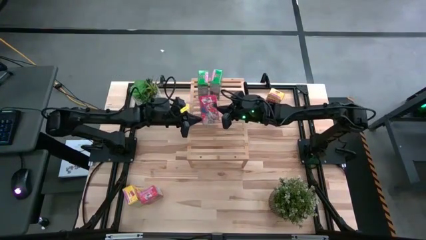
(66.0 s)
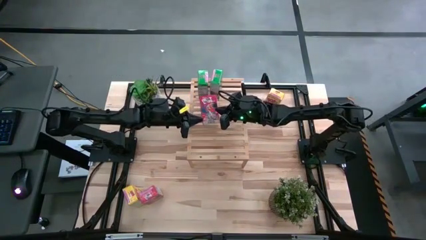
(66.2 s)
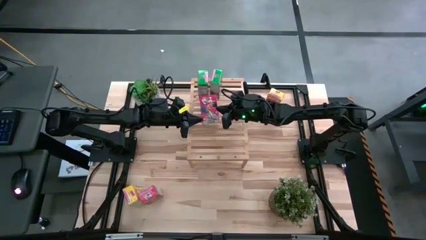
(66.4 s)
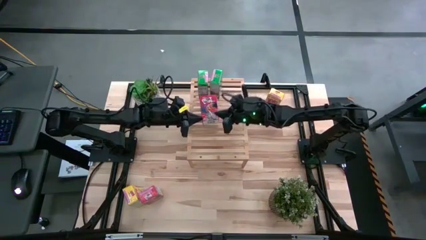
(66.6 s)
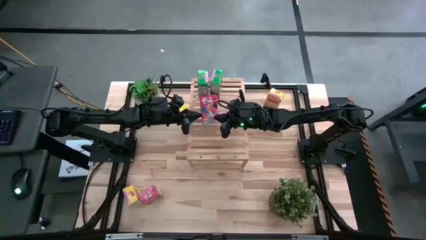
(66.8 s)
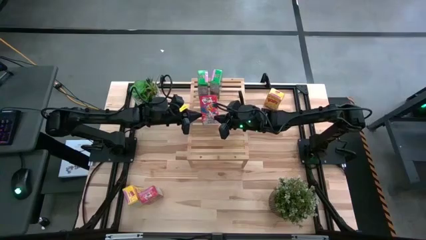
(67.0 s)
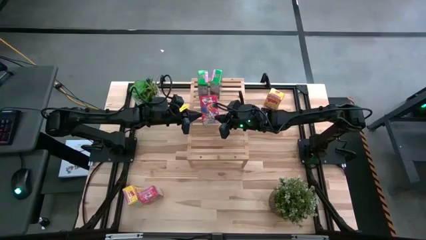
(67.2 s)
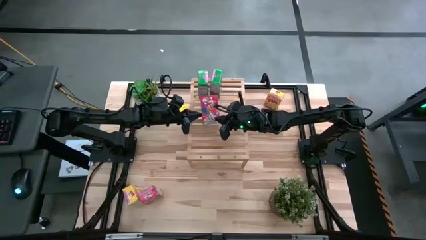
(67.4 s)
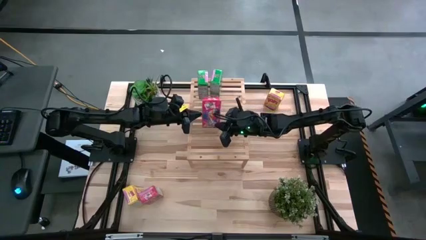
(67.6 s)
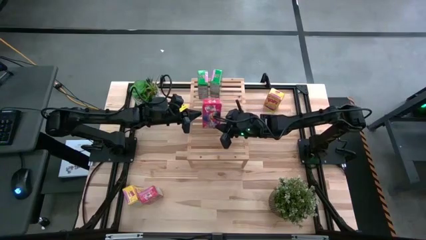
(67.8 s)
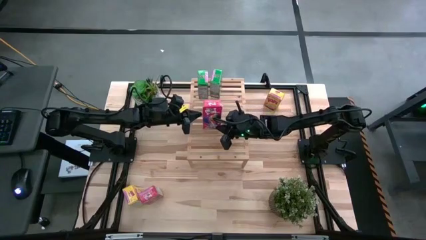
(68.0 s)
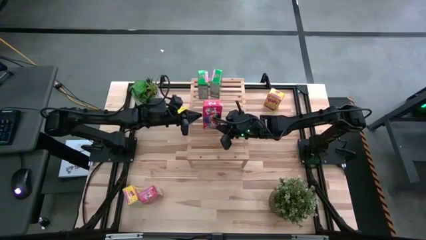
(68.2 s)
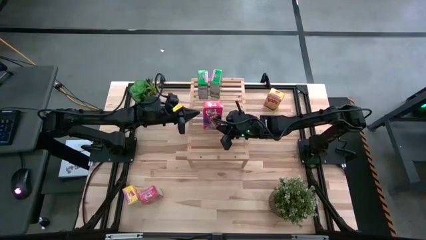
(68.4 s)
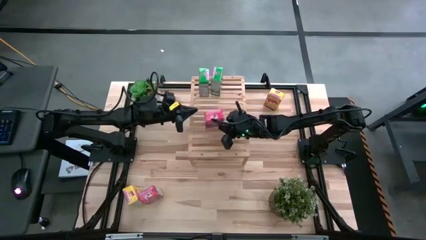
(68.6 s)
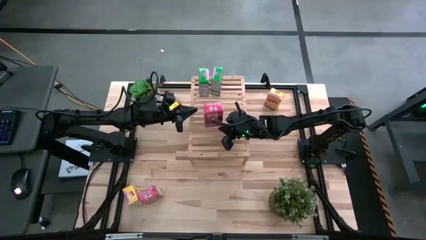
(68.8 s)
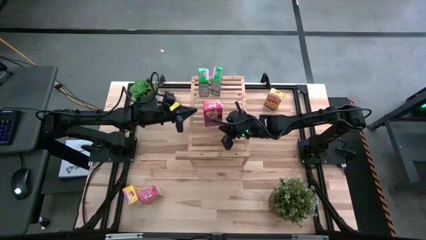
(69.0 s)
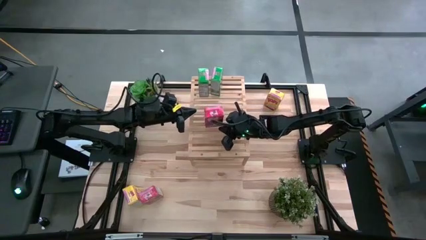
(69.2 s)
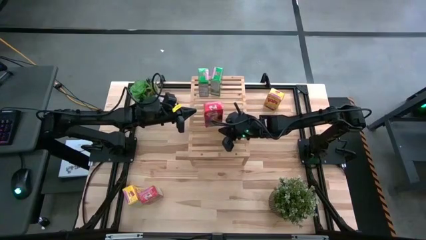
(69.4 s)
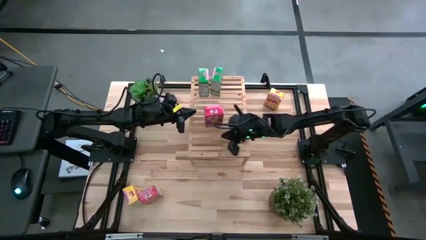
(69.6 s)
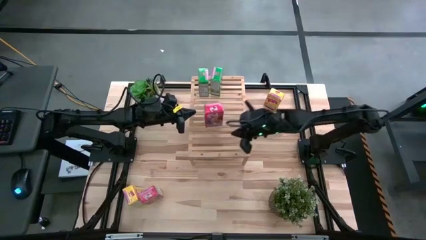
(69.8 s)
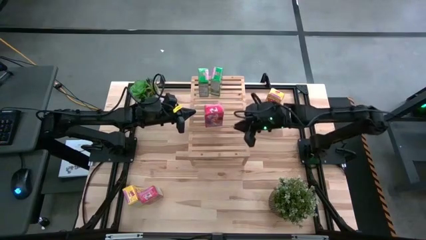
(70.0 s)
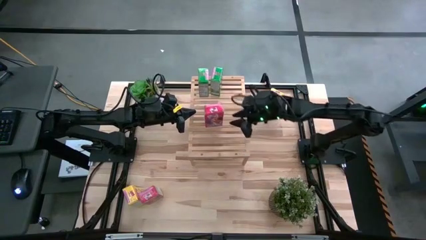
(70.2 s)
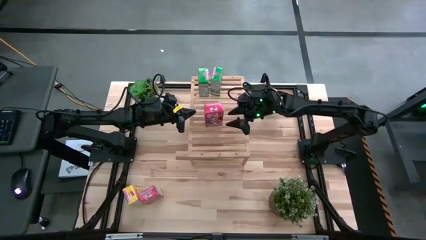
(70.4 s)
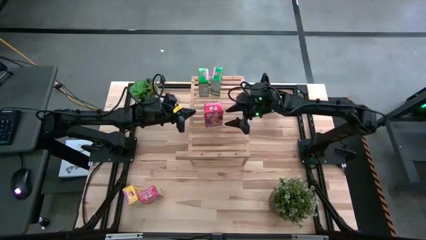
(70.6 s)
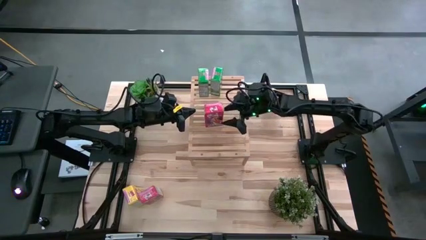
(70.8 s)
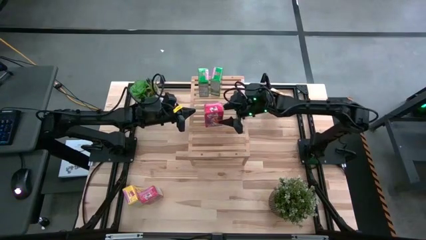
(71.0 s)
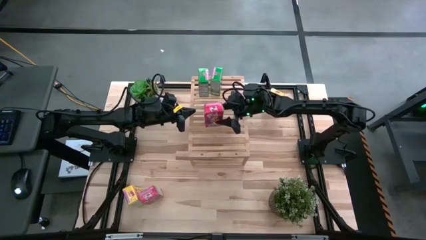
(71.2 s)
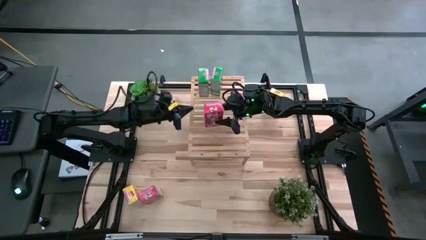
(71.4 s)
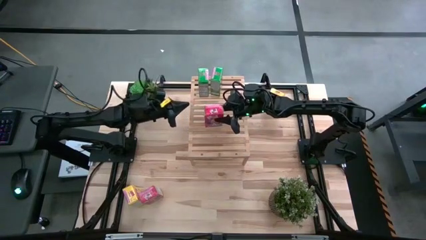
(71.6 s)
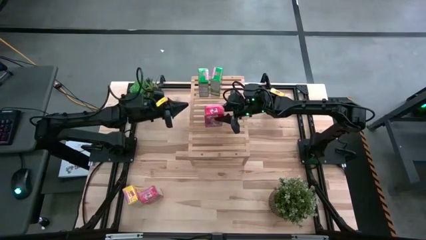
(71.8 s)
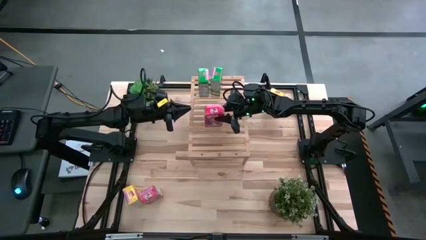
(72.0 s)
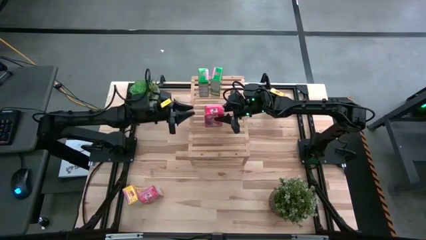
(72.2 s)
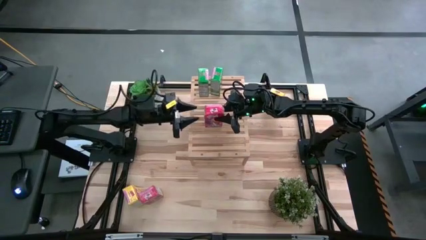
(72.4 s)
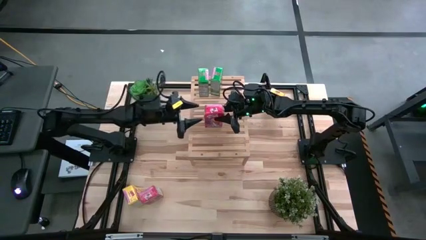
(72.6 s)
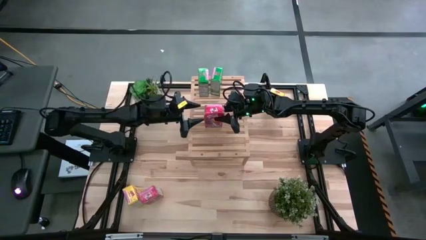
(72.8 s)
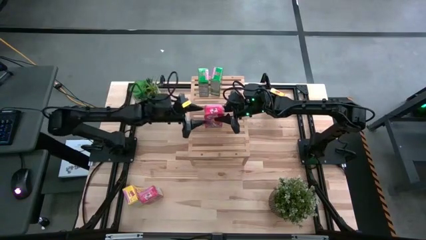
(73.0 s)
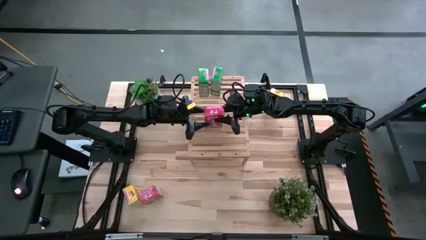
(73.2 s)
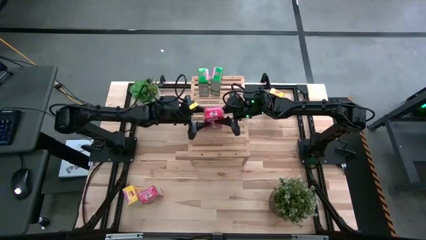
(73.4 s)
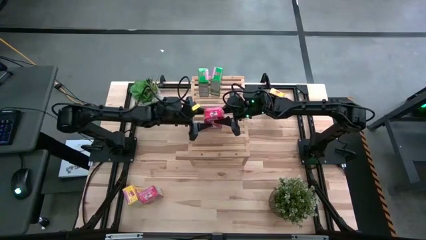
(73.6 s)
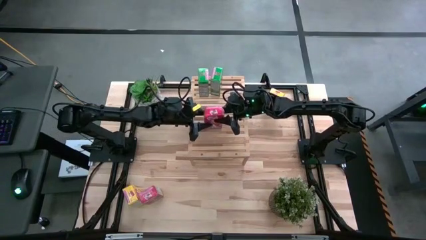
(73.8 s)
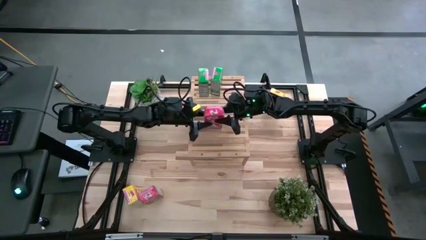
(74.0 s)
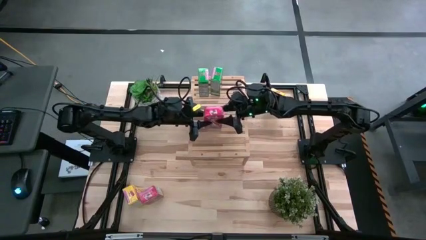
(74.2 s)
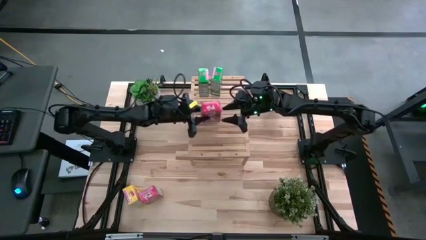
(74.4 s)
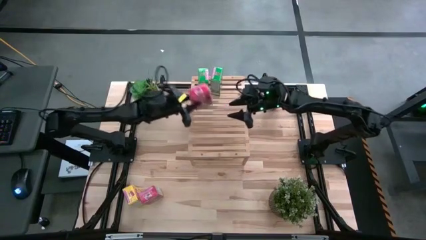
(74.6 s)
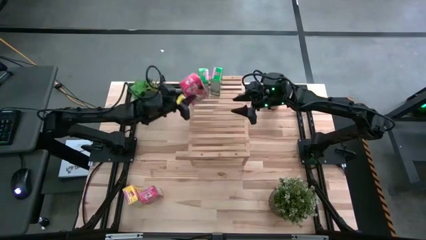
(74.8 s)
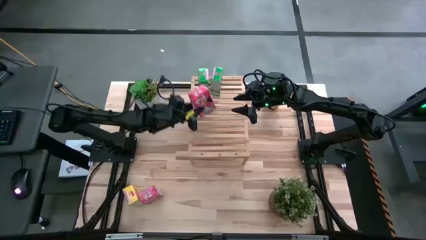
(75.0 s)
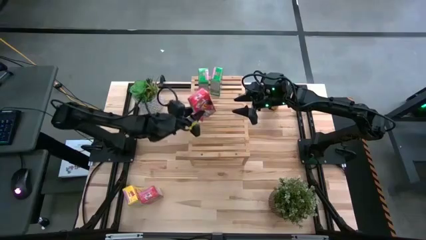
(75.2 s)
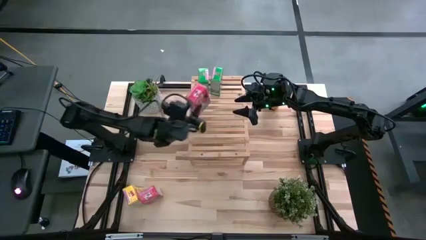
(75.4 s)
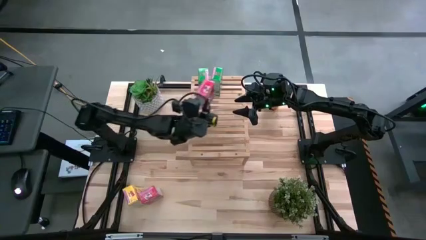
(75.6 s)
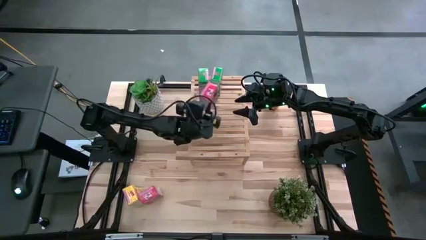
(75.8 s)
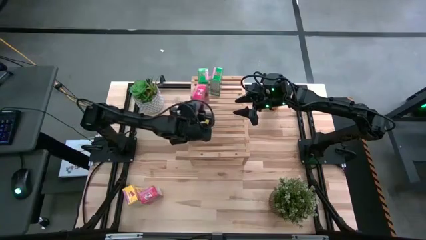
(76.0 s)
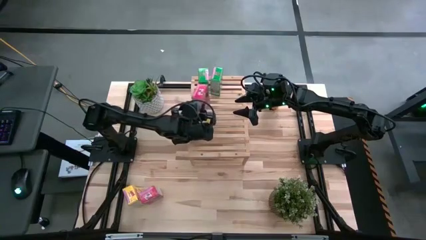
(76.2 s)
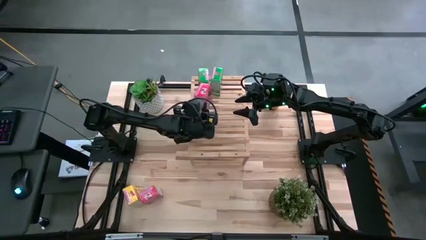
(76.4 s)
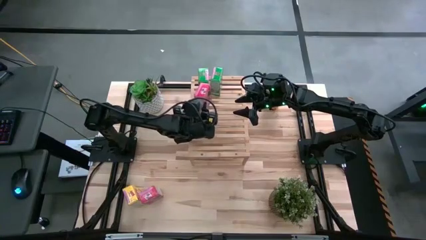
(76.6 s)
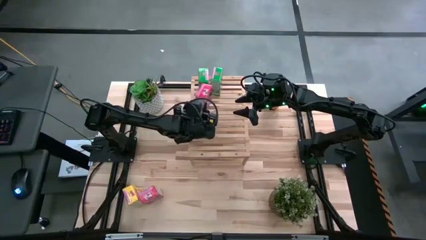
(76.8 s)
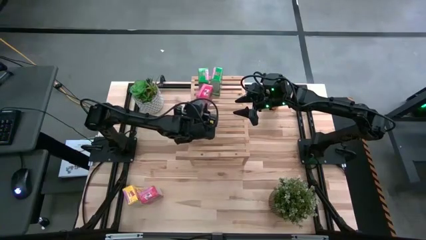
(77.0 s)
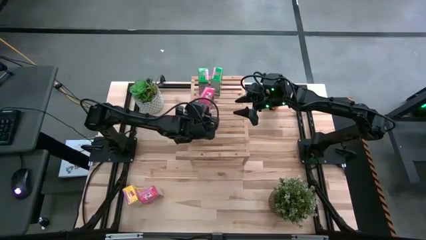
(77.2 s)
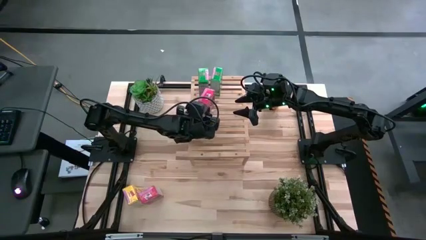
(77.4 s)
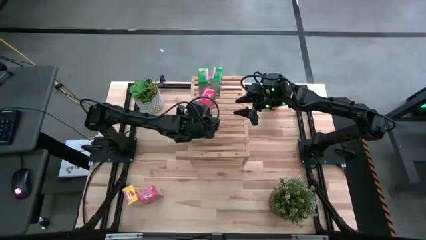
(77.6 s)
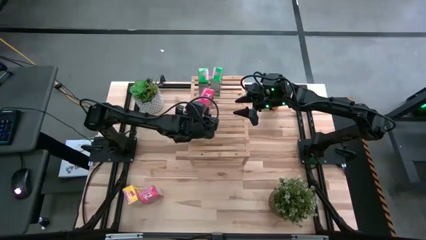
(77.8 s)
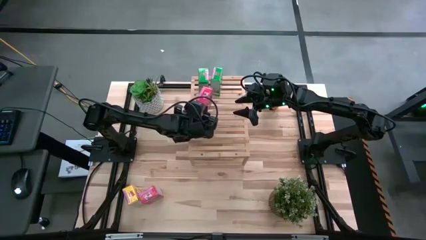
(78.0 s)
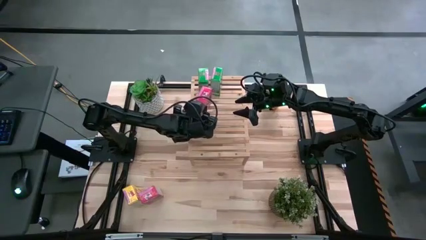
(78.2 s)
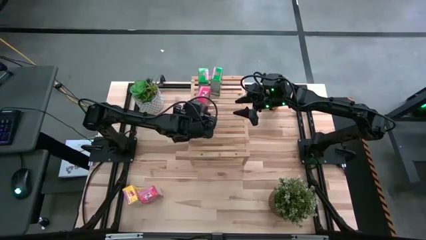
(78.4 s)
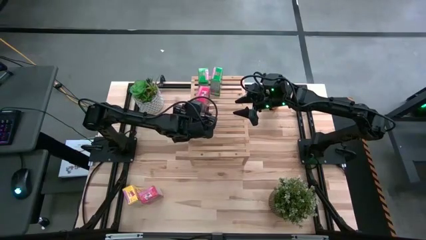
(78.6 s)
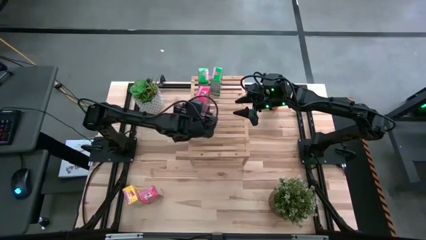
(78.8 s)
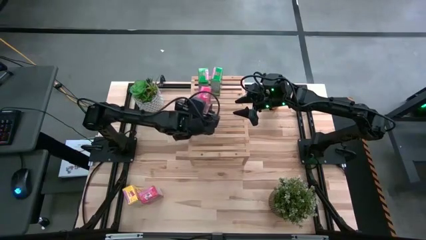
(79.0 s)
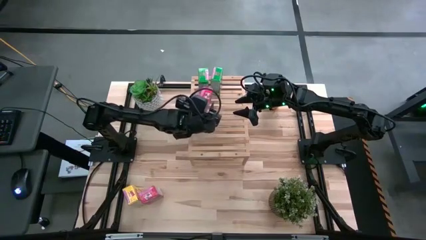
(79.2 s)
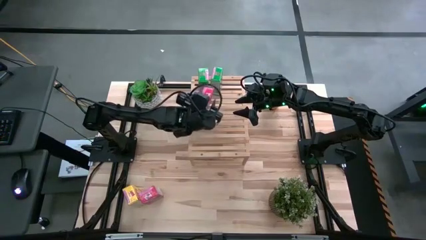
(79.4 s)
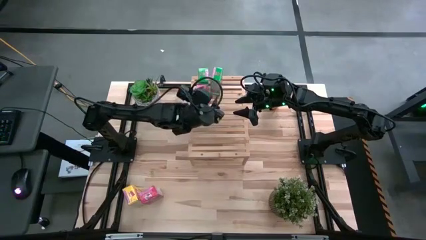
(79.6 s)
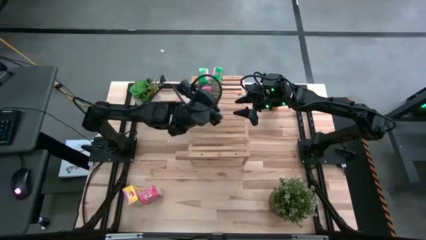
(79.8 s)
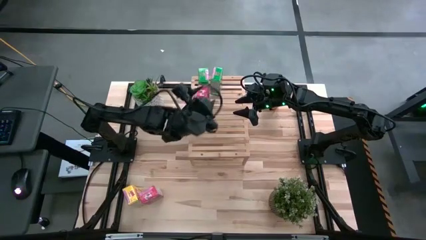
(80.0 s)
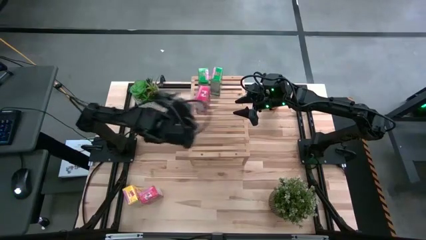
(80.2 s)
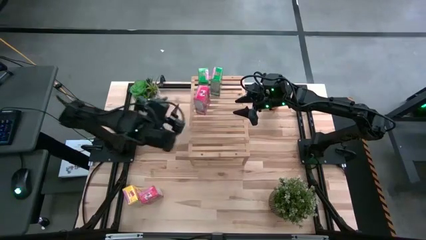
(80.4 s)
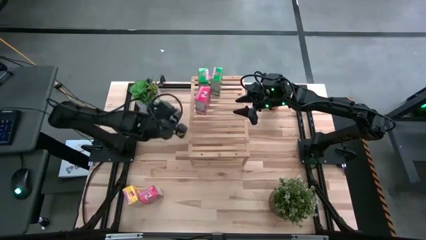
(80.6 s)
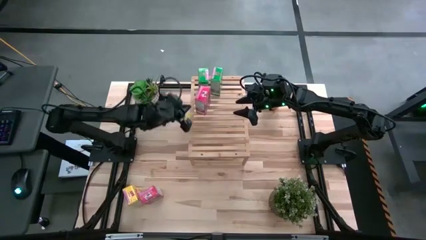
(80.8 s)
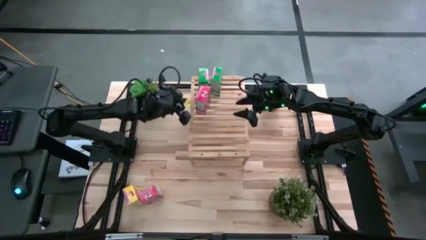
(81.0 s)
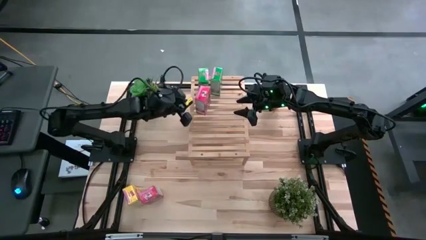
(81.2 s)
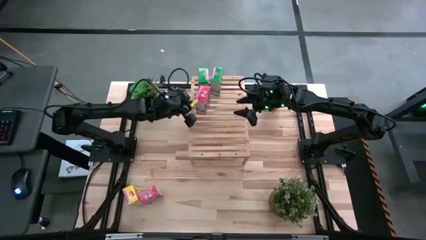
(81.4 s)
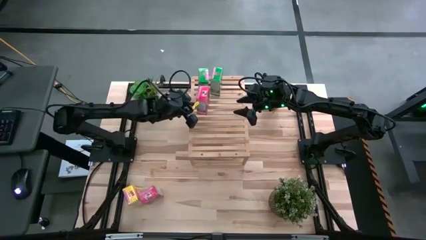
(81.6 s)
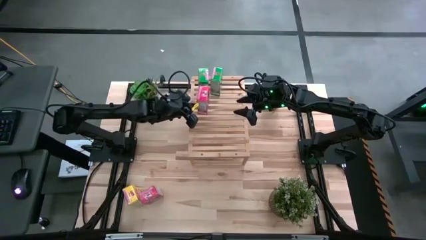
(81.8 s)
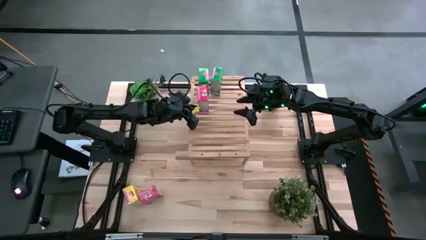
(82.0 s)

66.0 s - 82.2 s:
Task: Stack cereal on shelf
Put the top red cereal box on the shelf
